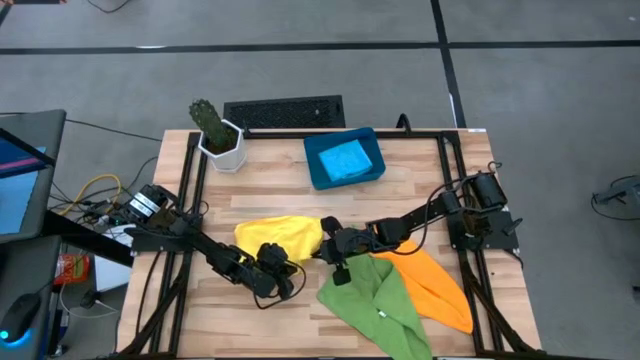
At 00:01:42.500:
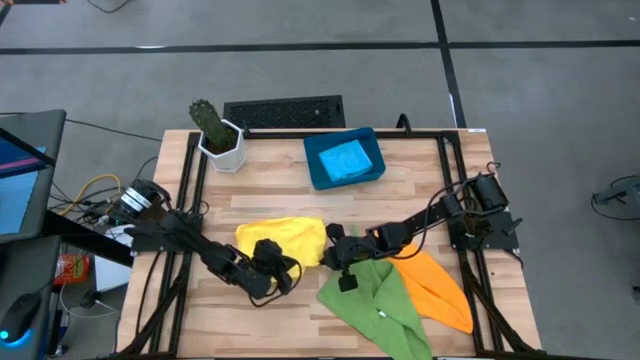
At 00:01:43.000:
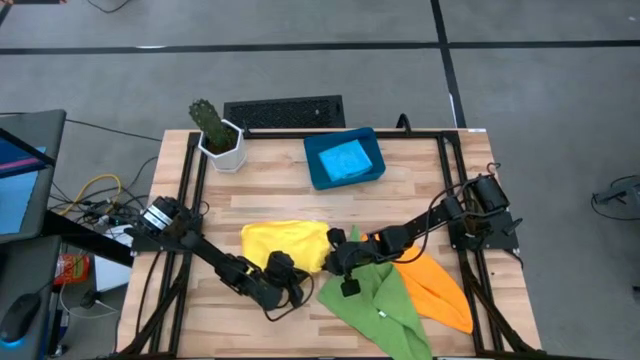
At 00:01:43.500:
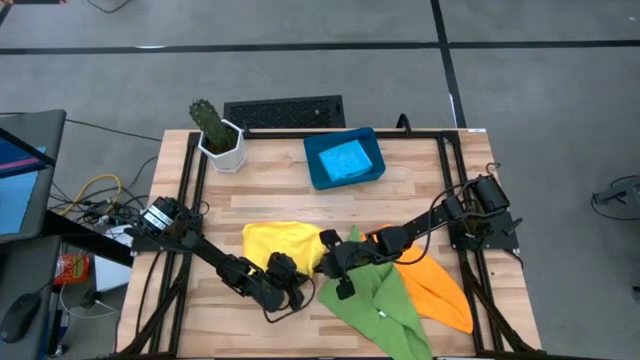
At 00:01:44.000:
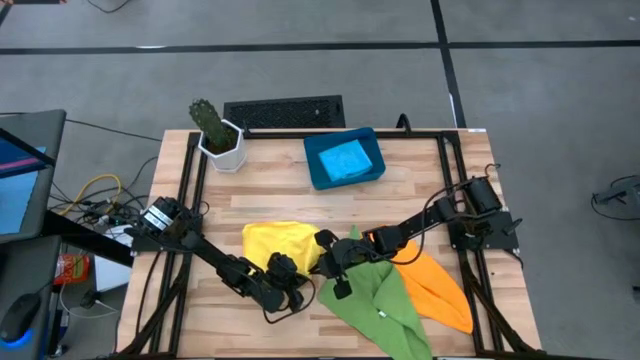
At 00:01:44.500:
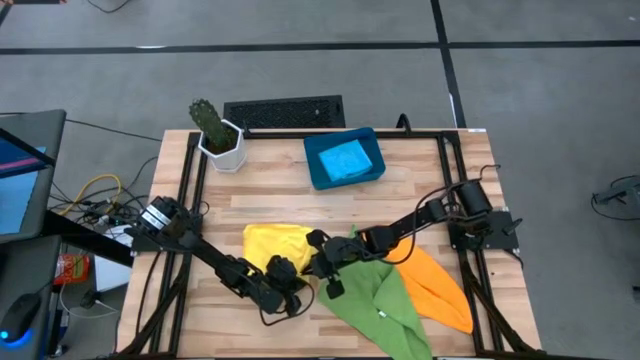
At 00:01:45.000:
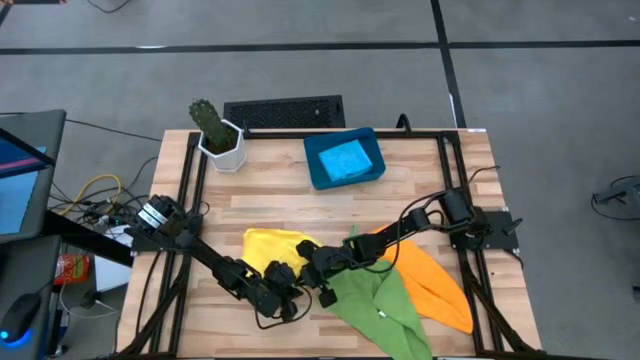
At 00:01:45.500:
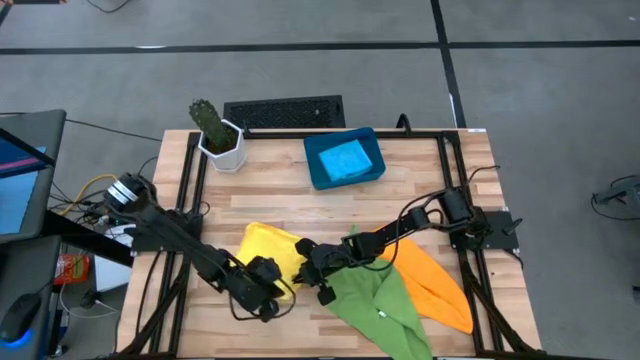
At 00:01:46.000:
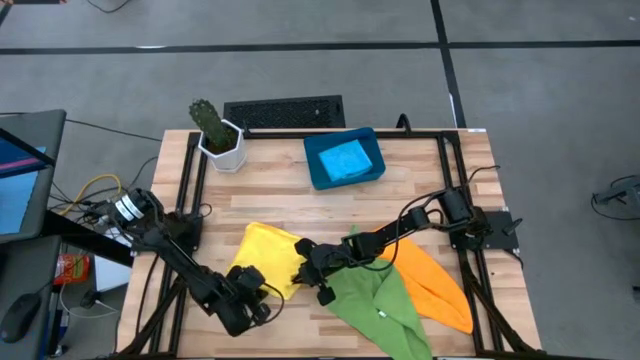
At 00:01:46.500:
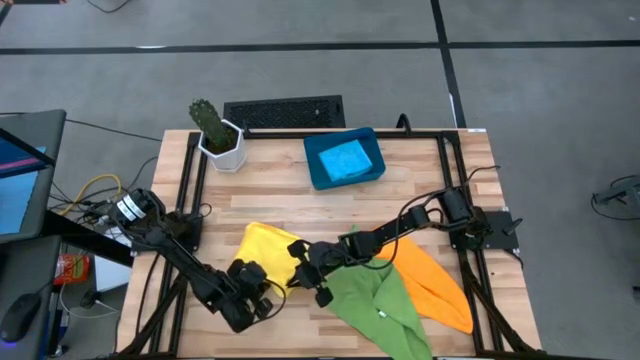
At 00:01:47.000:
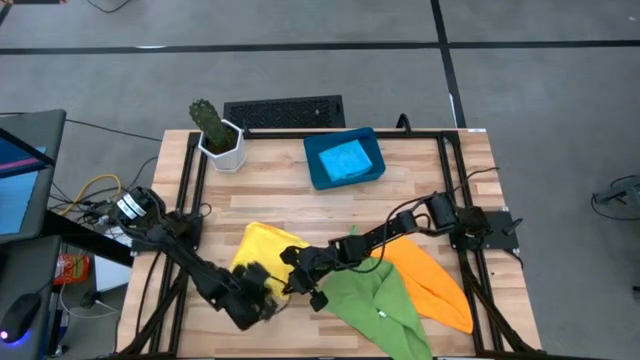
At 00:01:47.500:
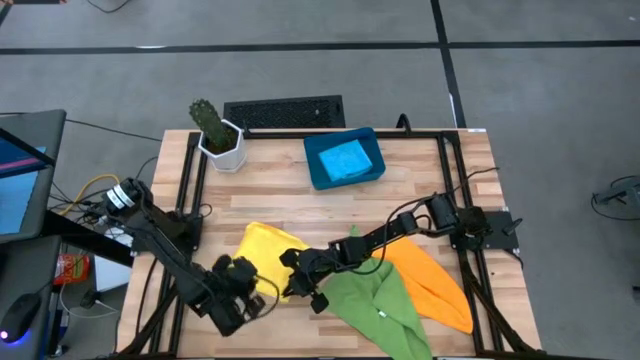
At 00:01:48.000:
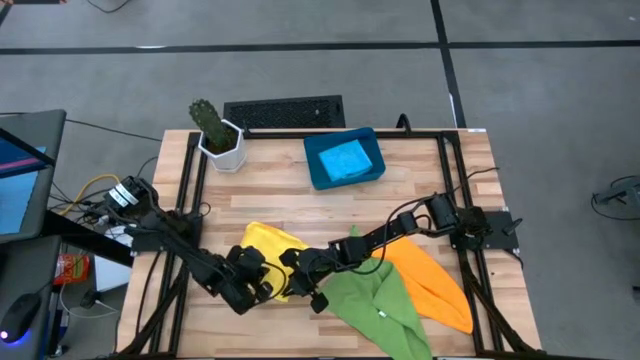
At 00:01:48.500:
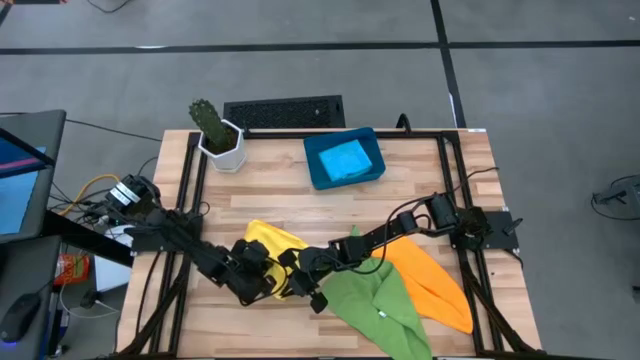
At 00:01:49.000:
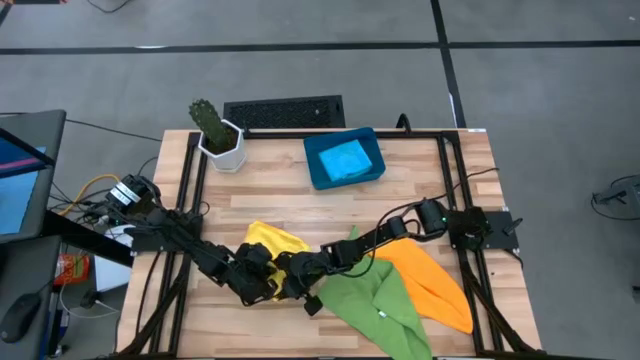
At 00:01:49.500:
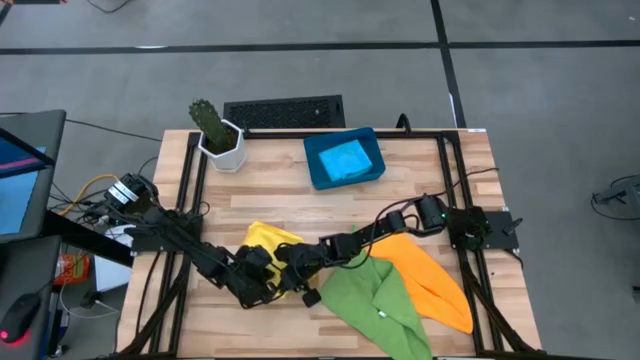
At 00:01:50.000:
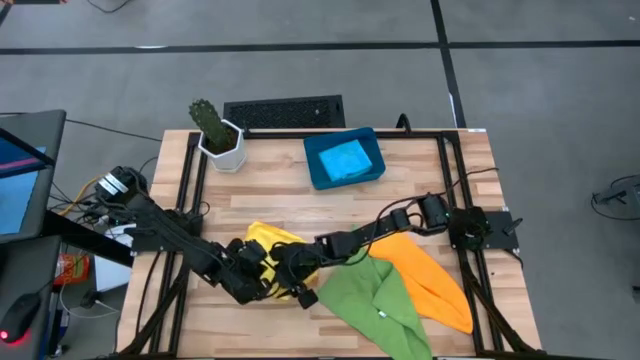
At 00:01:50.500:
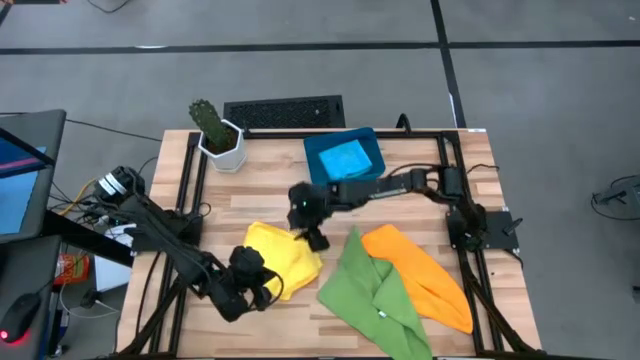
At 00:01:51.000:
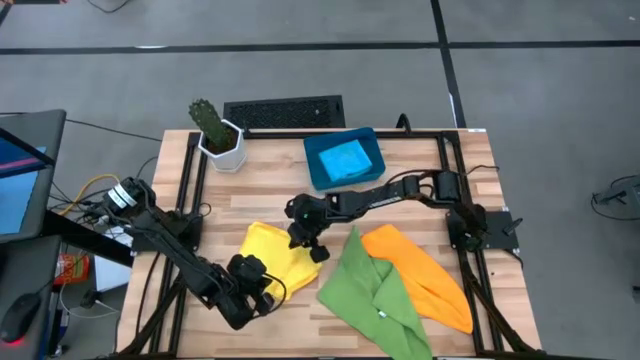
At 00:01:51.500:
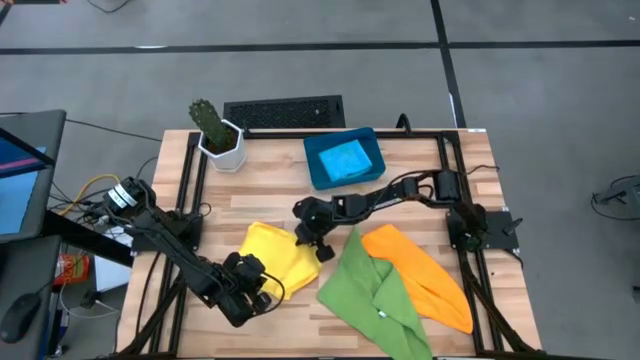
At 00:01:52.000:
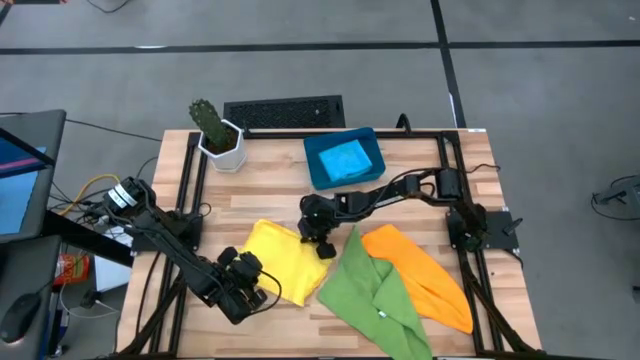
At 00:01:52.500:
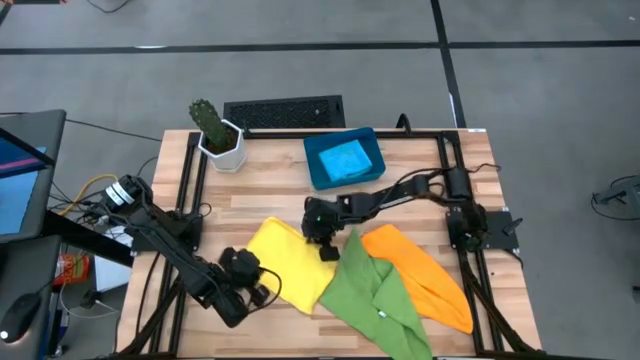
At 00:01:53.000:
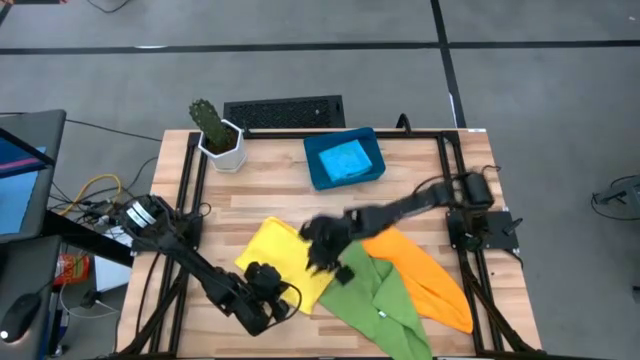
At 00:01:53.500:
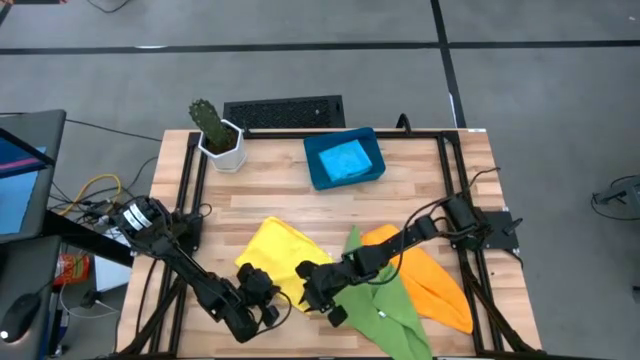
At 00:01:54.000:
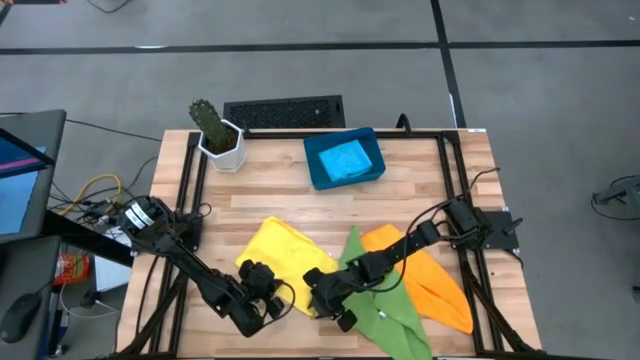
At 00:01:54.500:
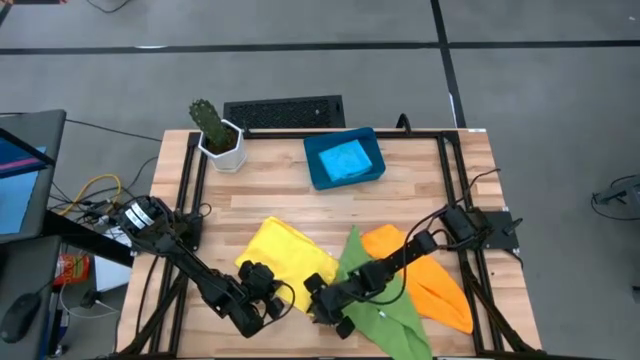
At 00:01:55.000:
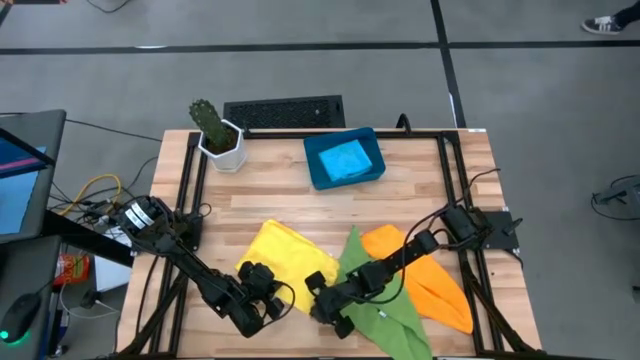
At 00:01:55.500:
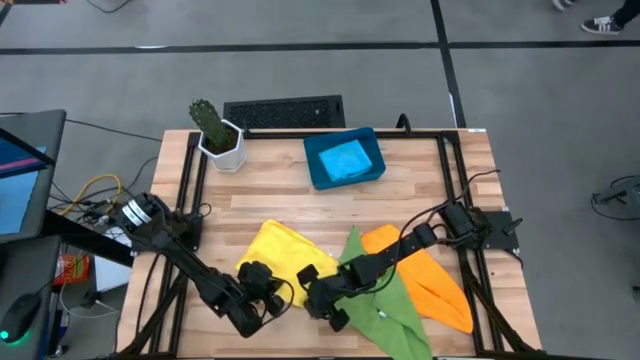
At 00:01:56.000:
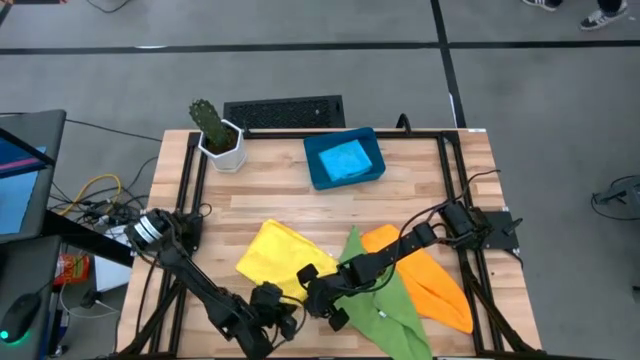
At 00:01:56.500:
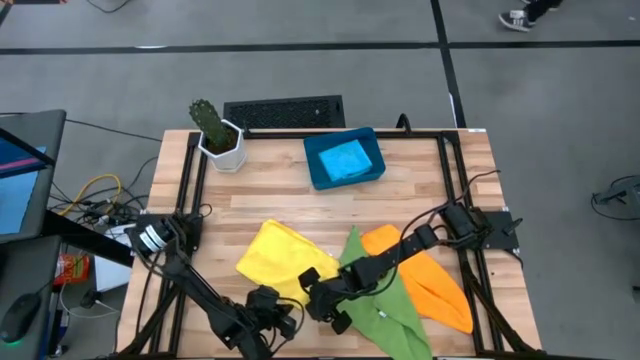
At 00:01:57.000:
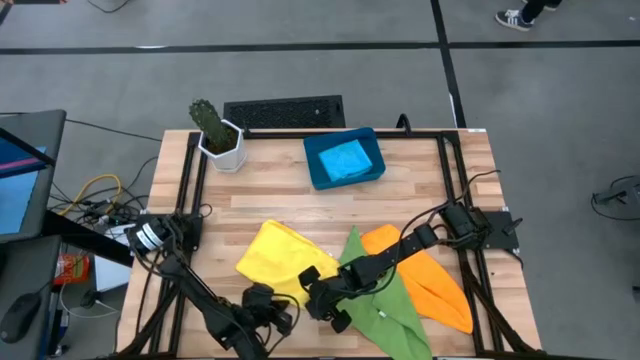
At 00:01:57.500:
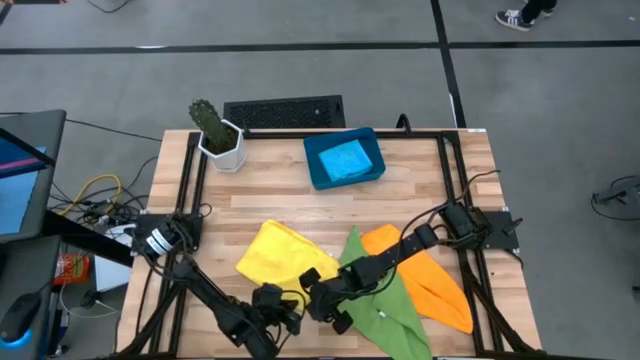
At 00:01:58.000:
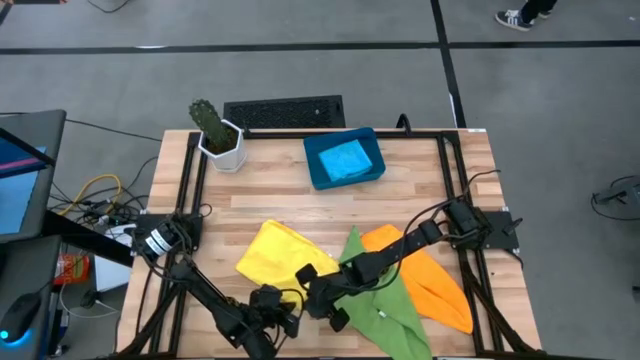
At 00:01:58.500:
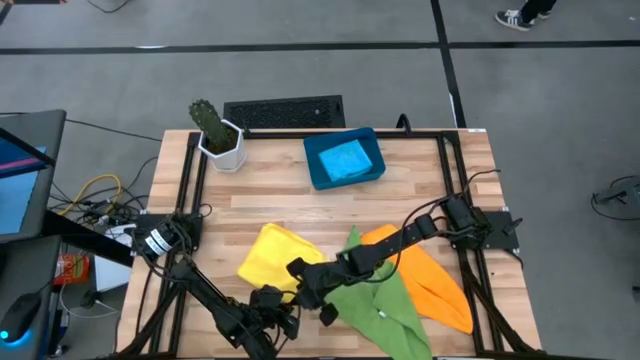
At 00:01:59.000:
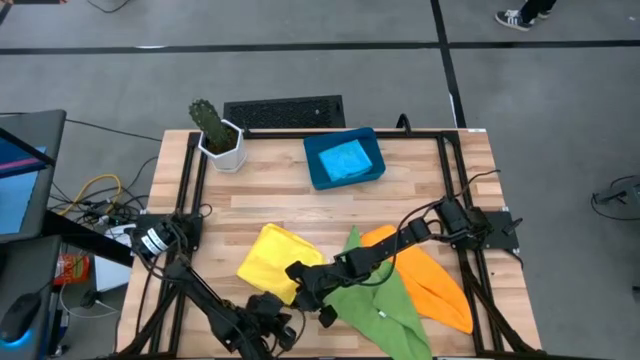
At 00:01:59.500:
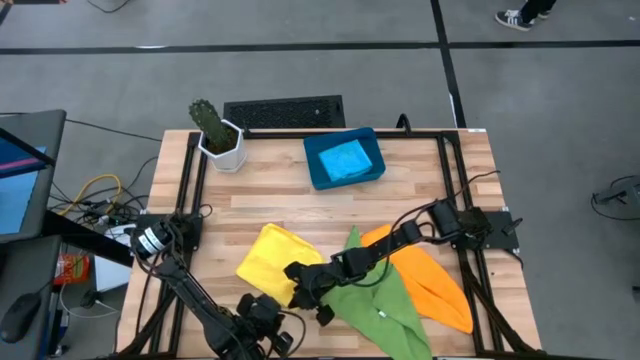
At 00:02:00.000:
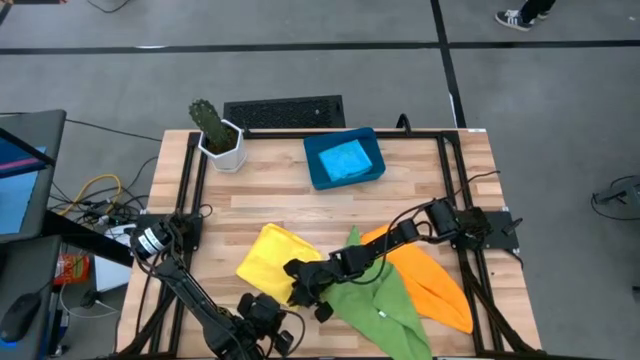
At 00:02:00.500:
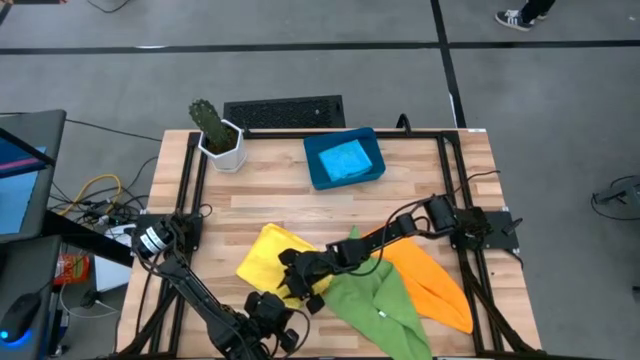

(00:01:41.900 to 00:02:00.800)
Task: Fold microfiber towels
Fold the yellow microfiber cloth

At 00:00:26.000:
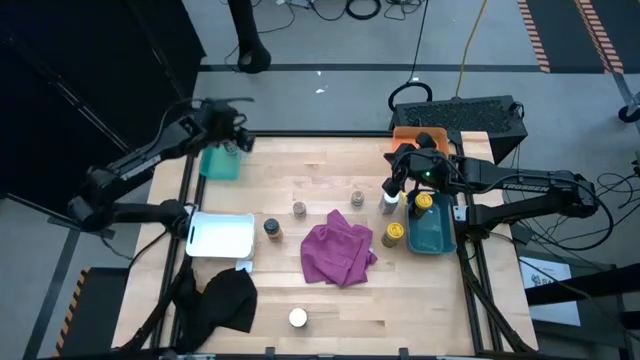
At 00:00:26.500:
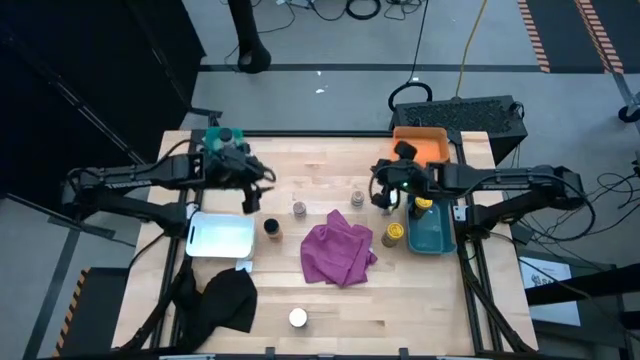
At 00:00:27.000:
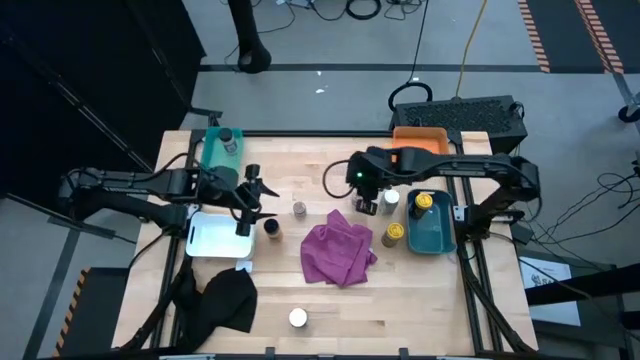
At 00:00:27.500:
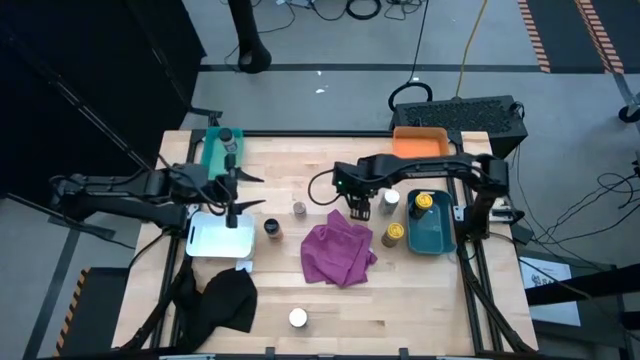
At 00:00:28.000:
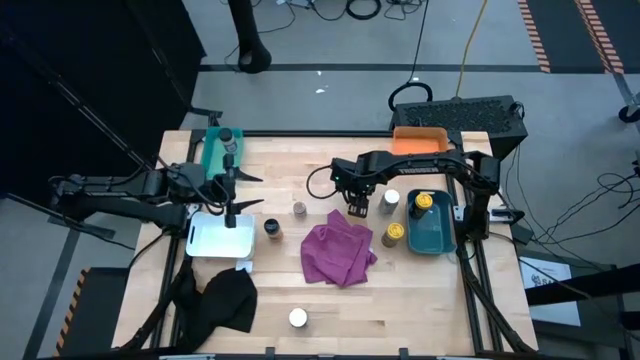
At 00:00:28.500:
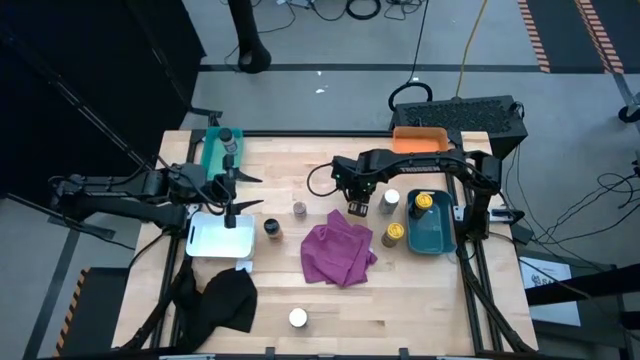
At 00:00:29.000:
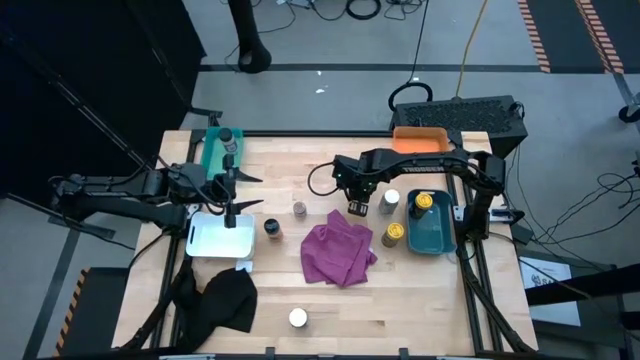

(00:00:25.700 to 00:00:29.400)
Task: Sort spices by type
Put the right brown seasoning bottle into the orange bin
